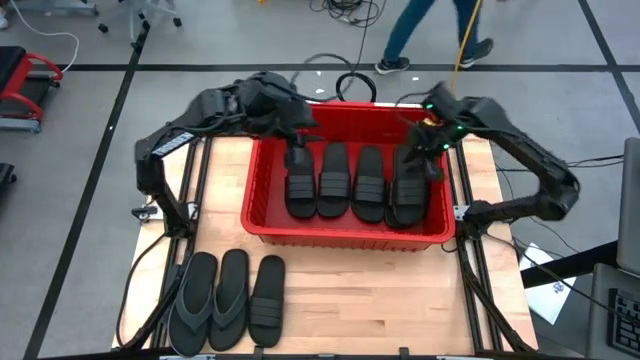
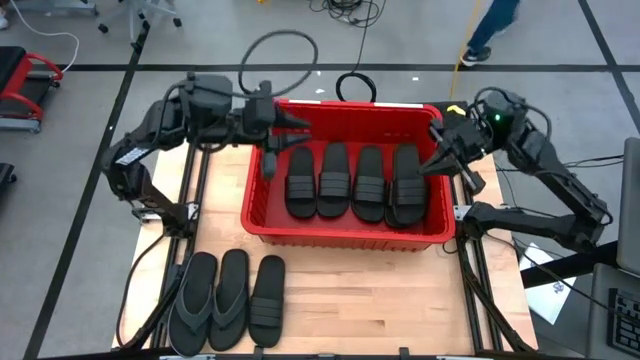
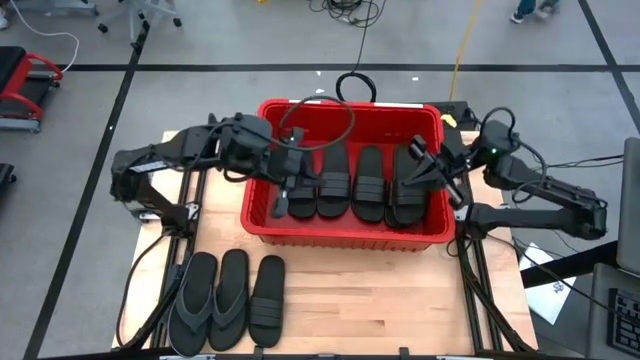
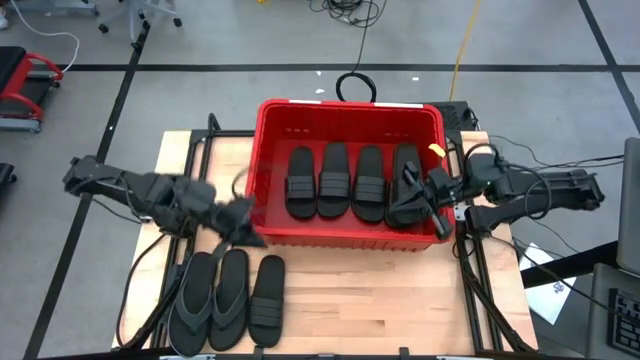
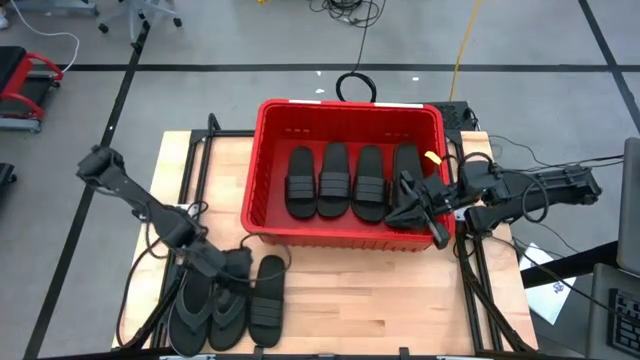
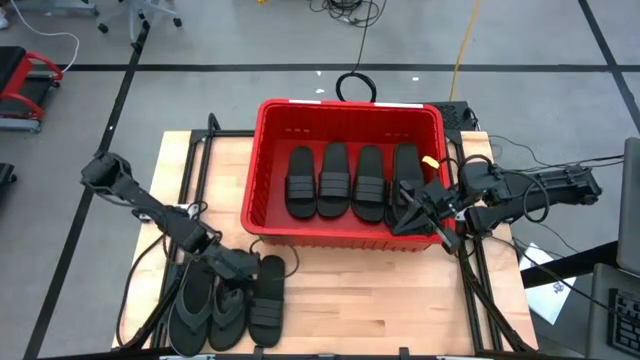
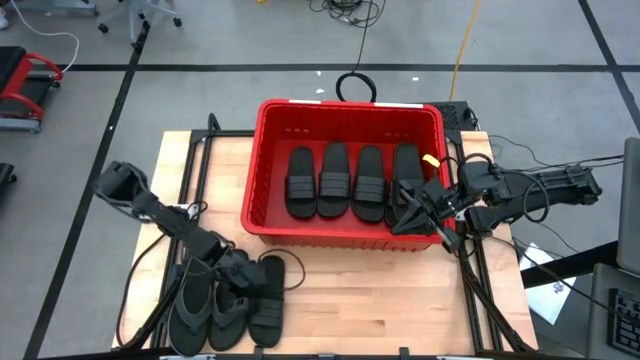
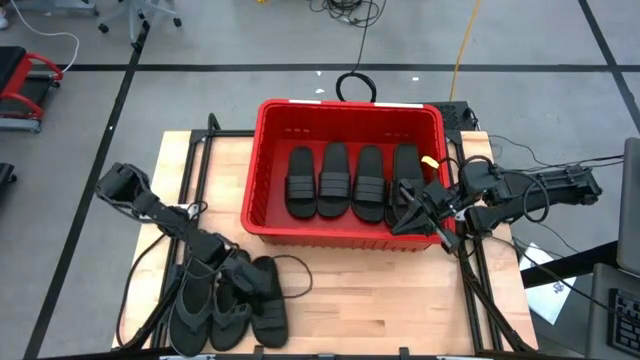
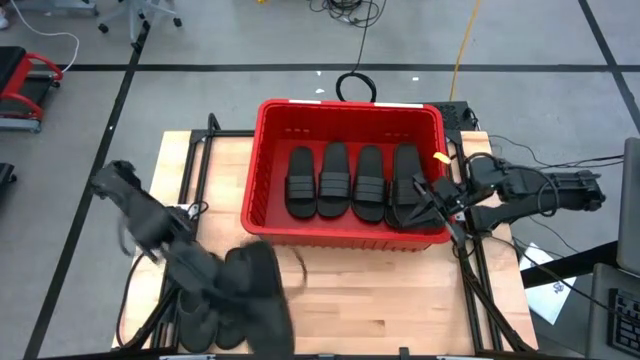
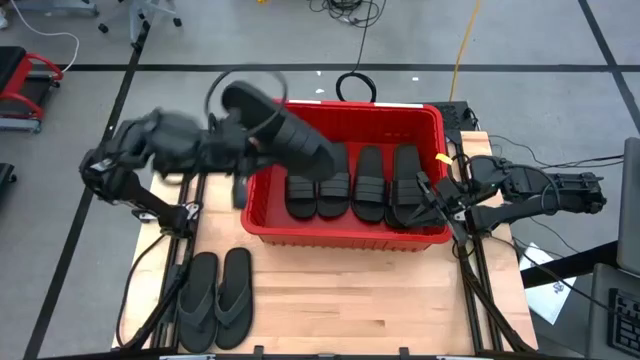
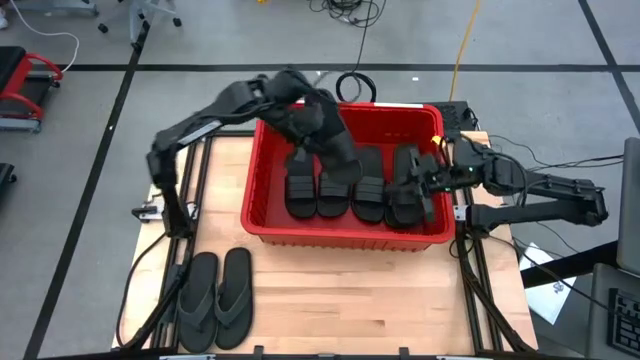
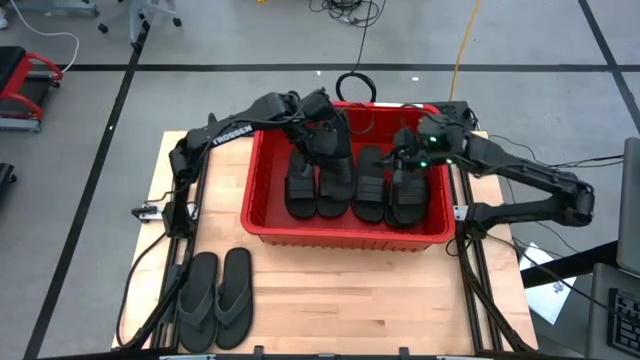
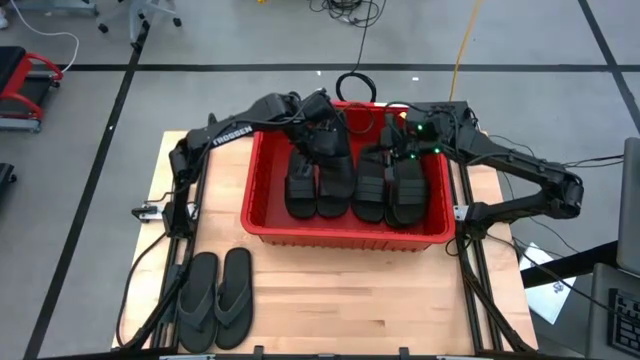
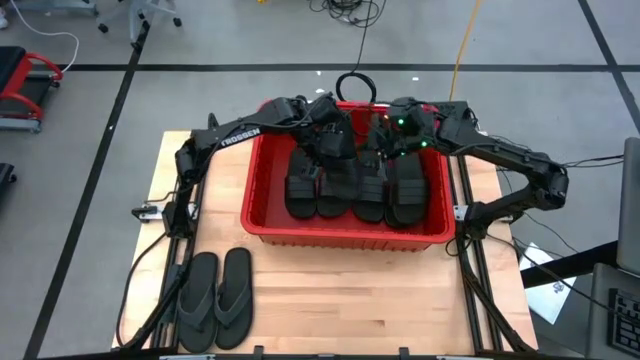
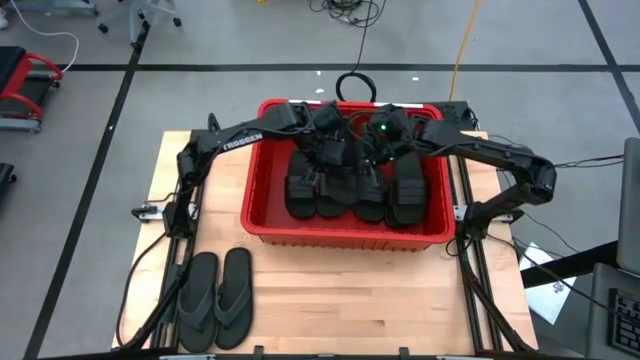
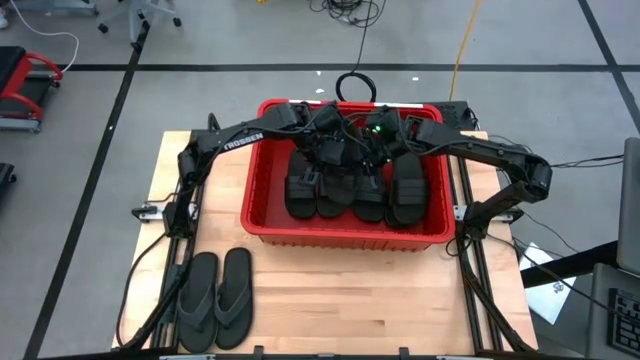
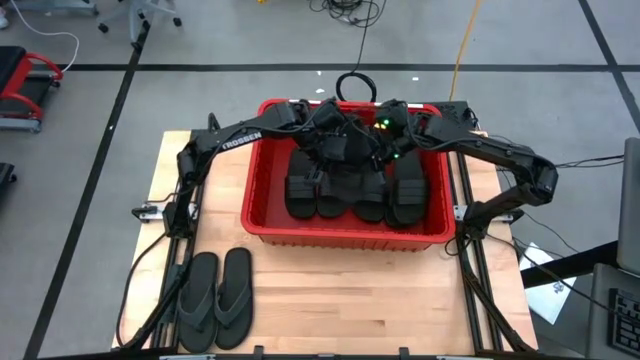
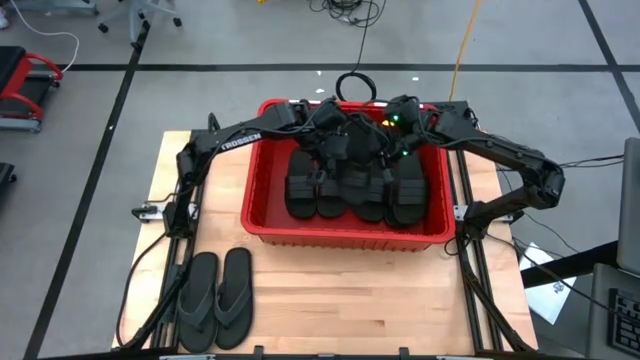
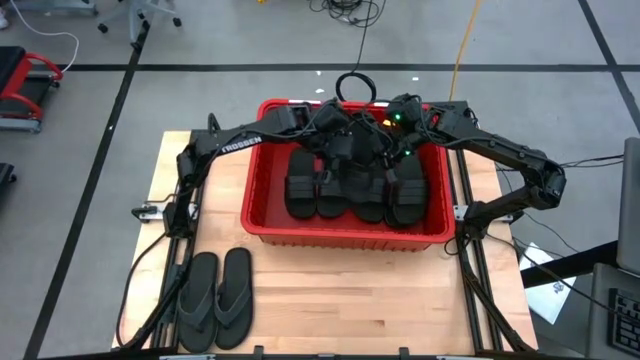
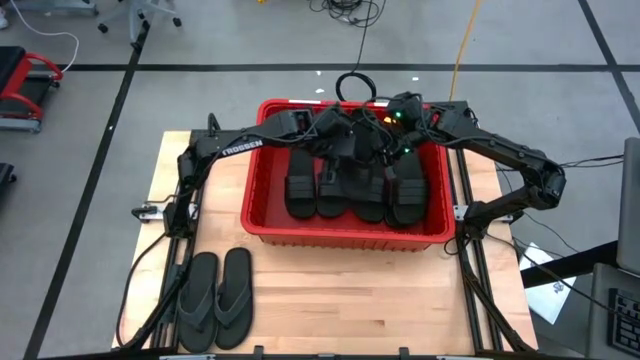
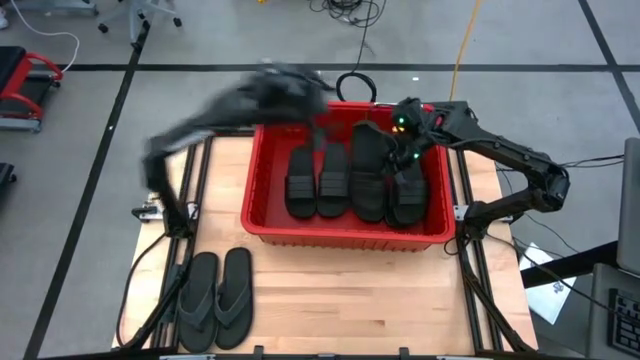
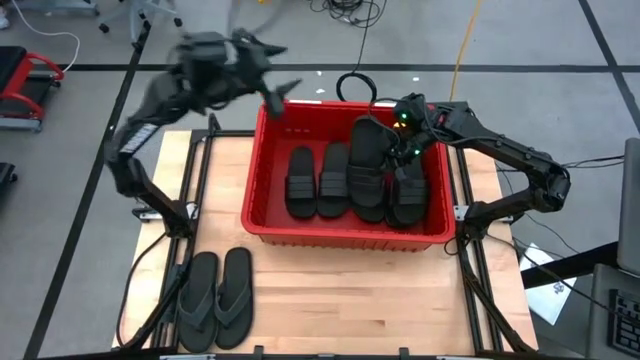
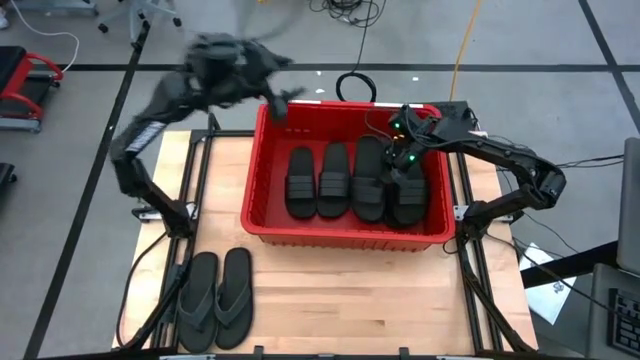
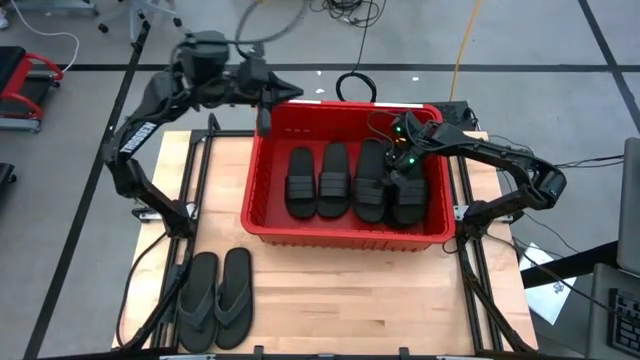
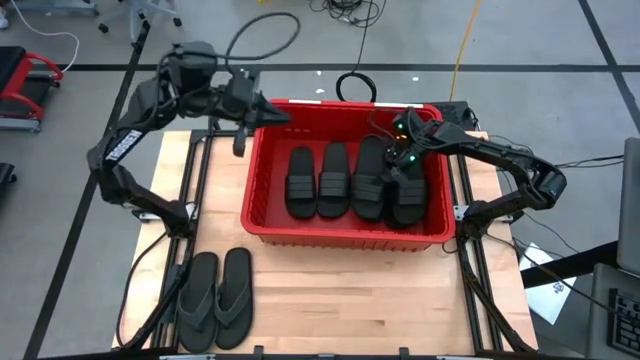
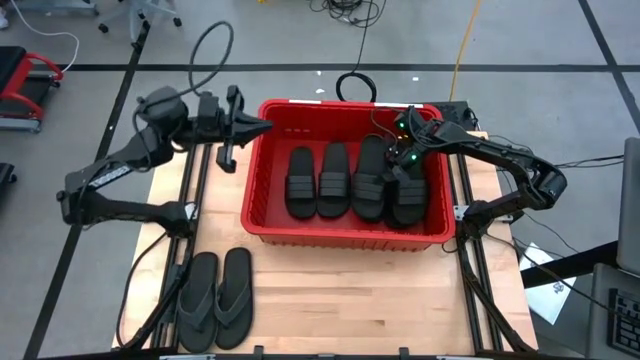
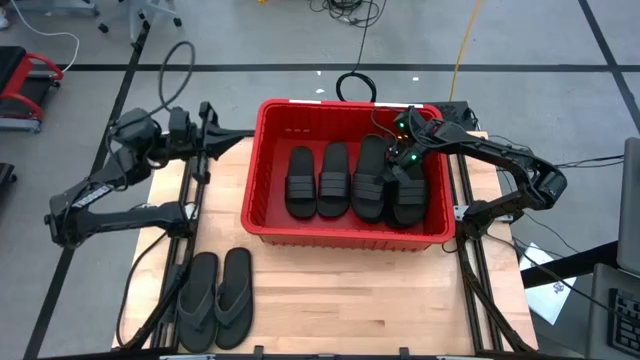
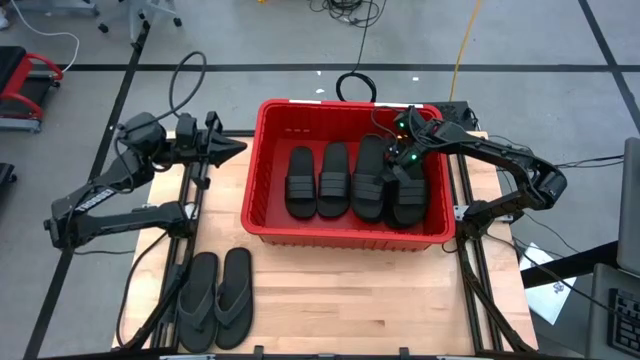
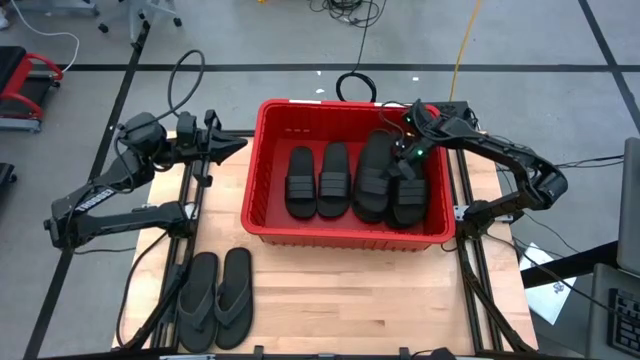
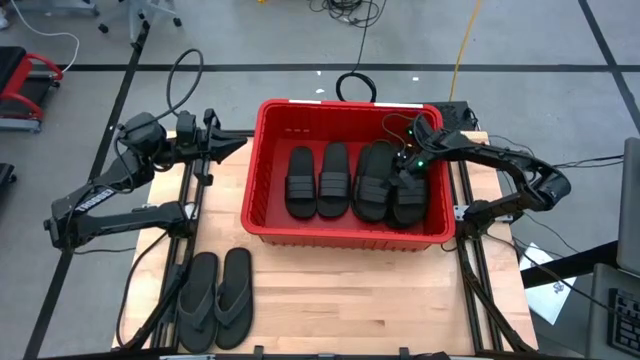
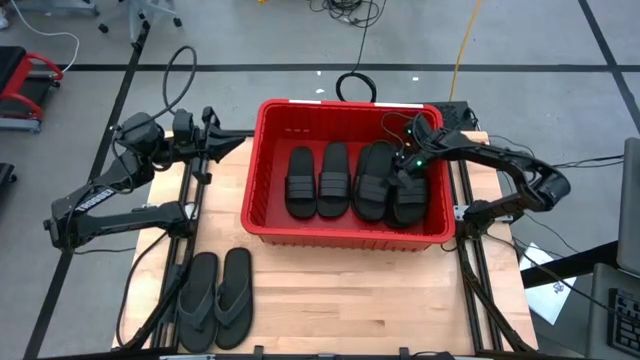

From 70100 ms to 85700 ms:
Task: Pick and place slides into bin
Put the black slide into the red bin

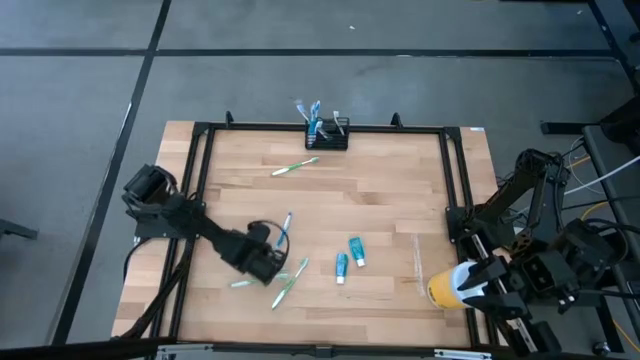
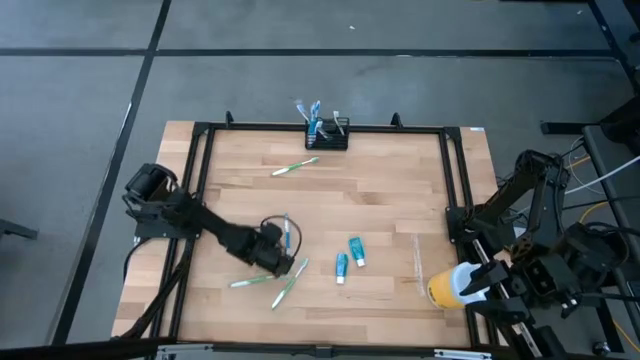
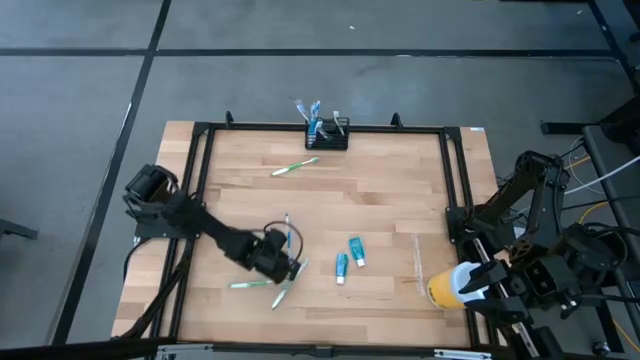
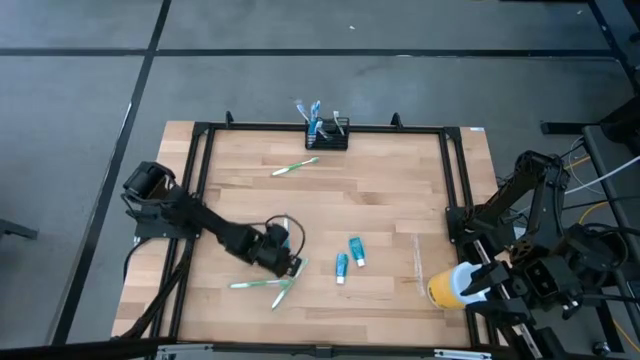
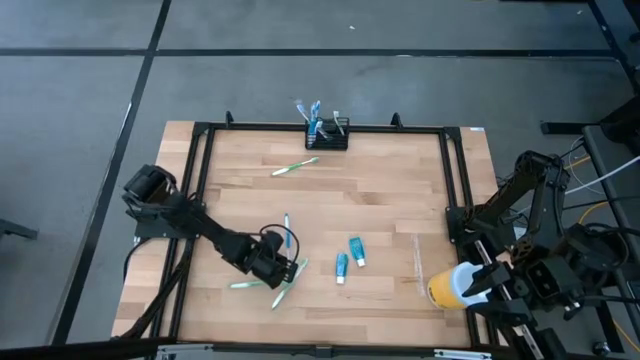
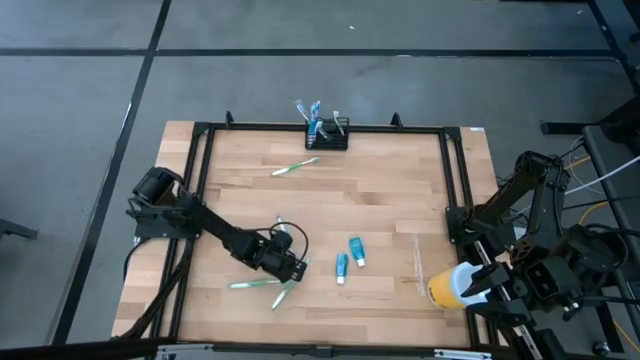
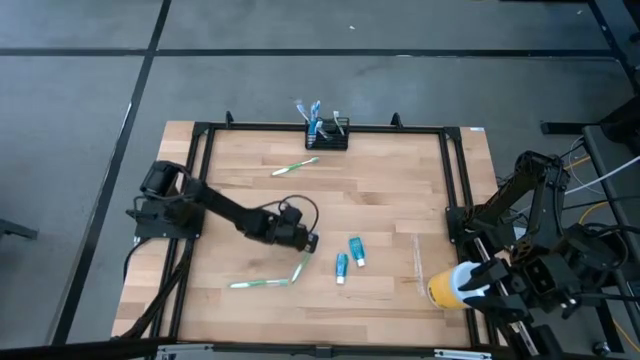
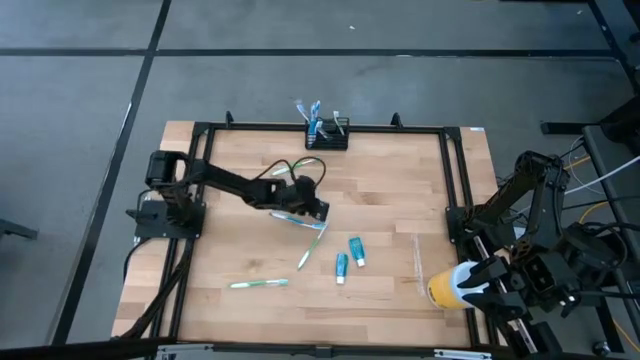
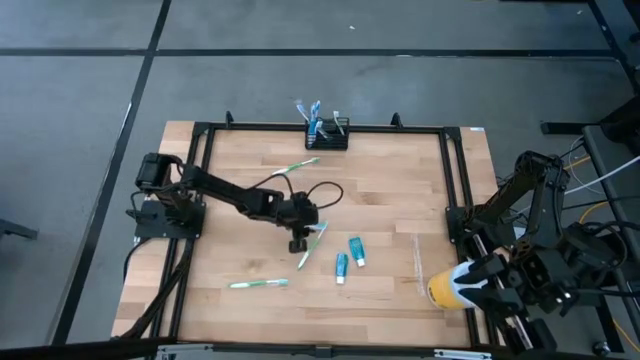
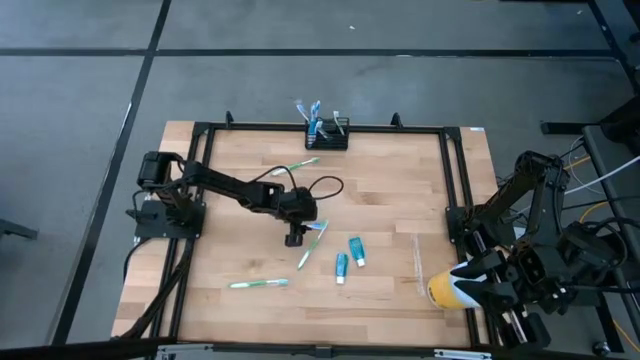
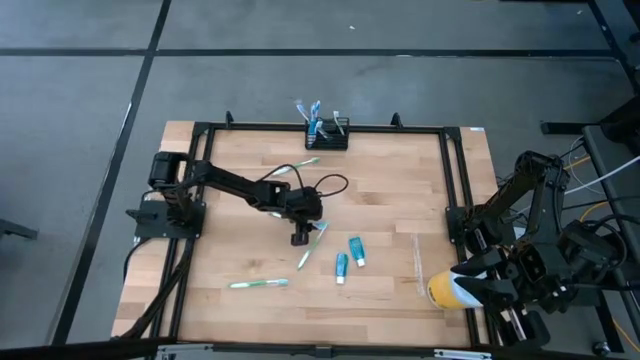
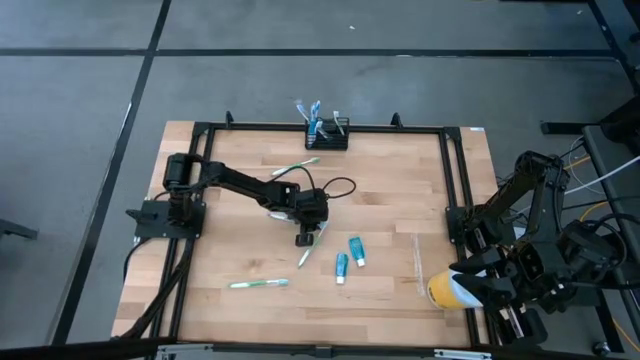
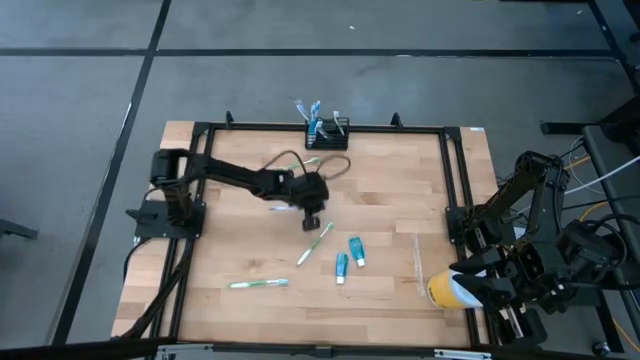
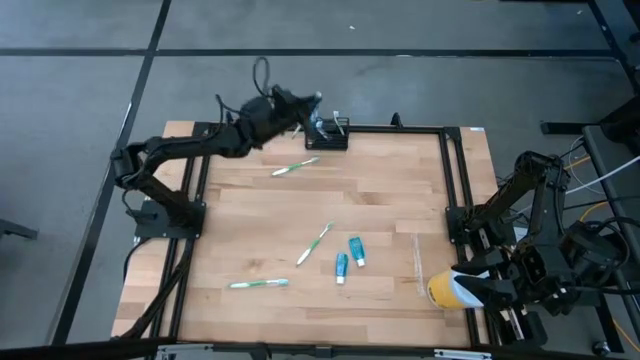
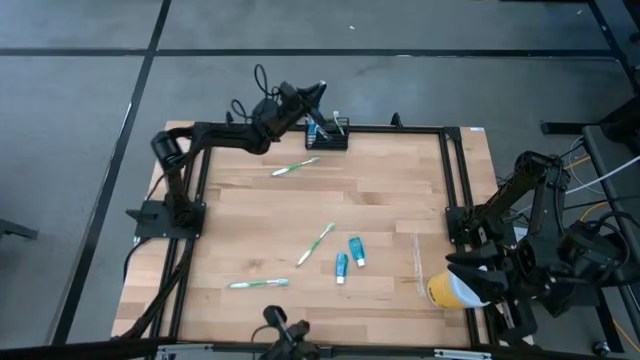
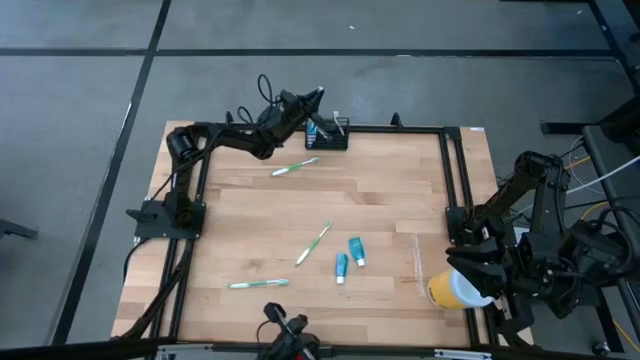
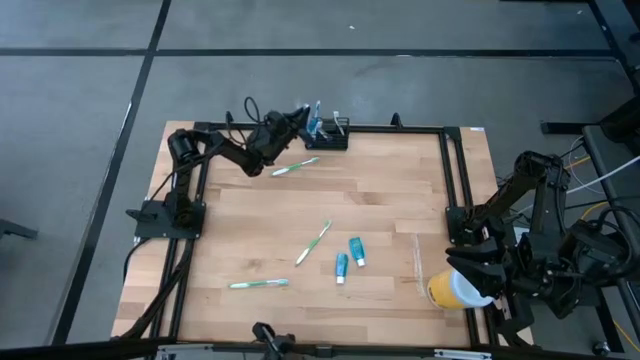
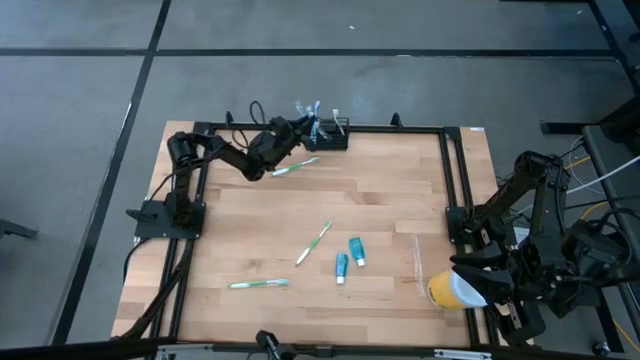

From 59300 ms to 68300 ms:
Task: Pick & Place toothbrushing station
Put the blue toothbrush into the wire organizer
